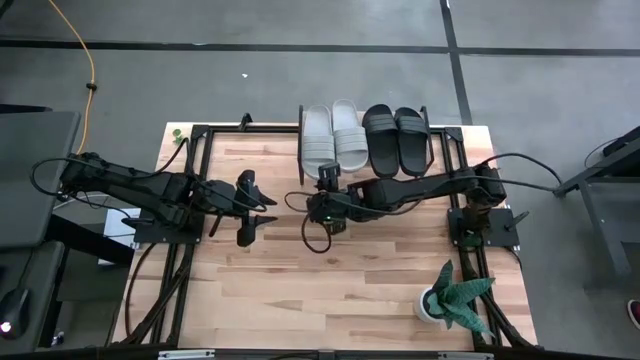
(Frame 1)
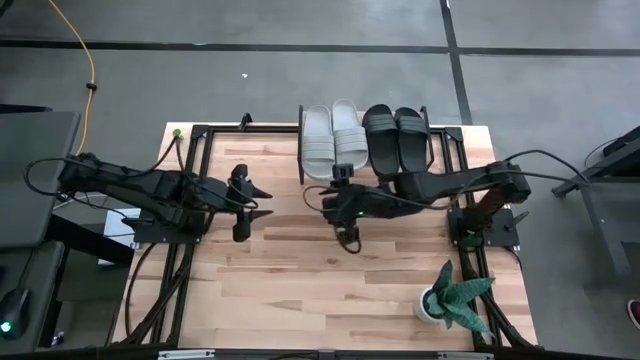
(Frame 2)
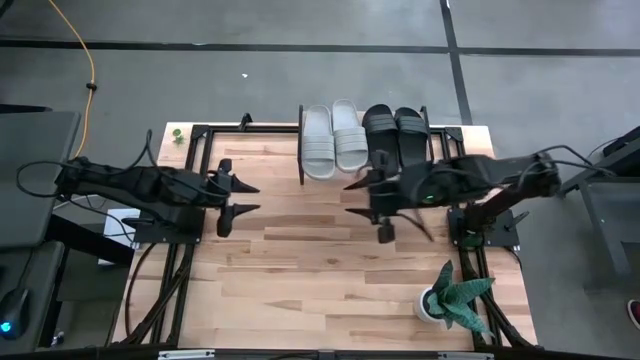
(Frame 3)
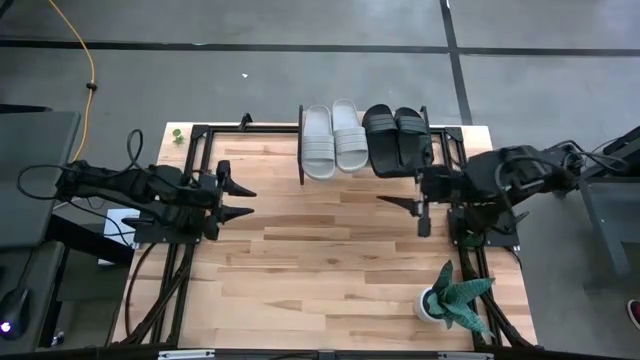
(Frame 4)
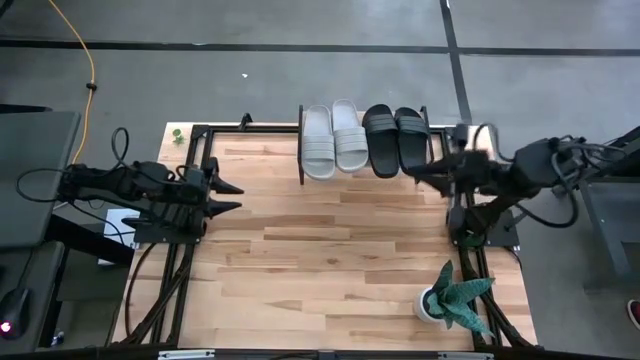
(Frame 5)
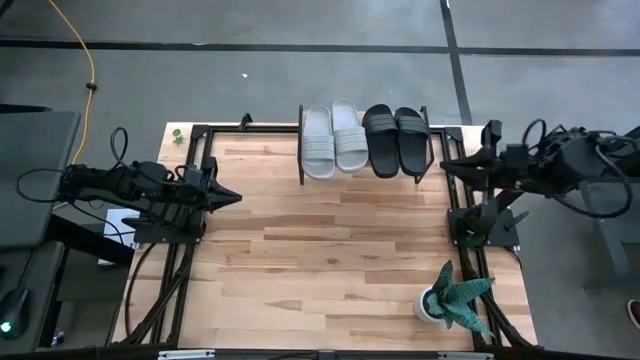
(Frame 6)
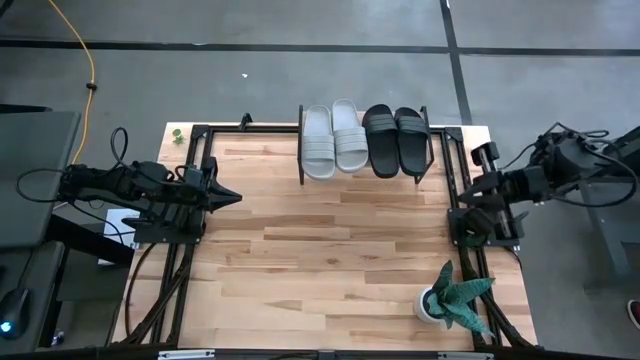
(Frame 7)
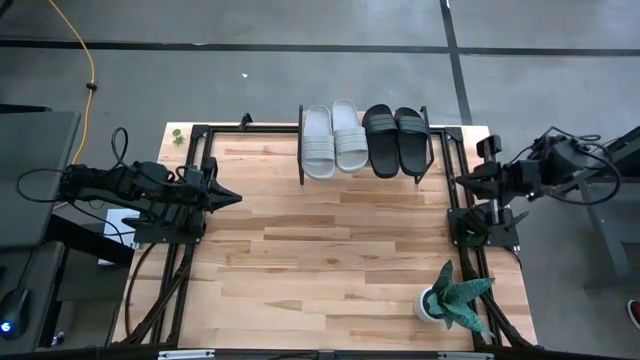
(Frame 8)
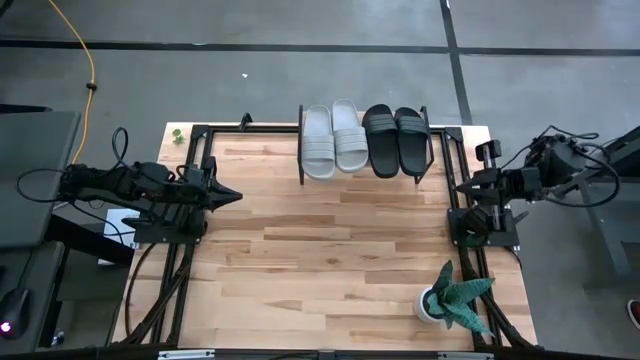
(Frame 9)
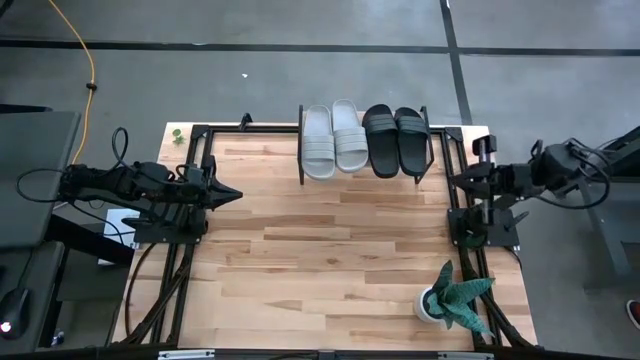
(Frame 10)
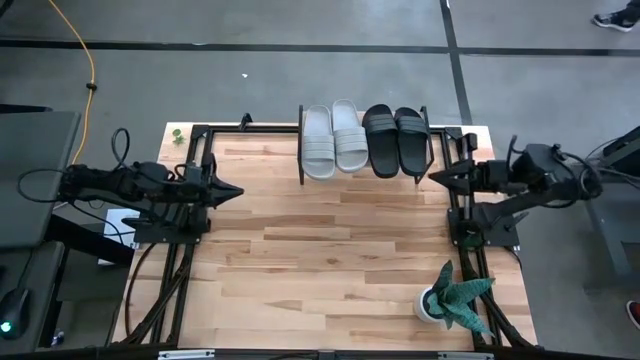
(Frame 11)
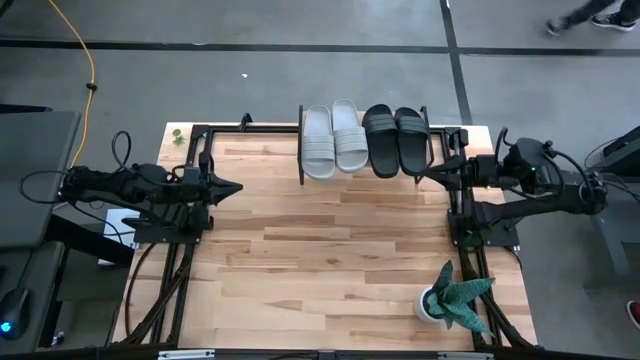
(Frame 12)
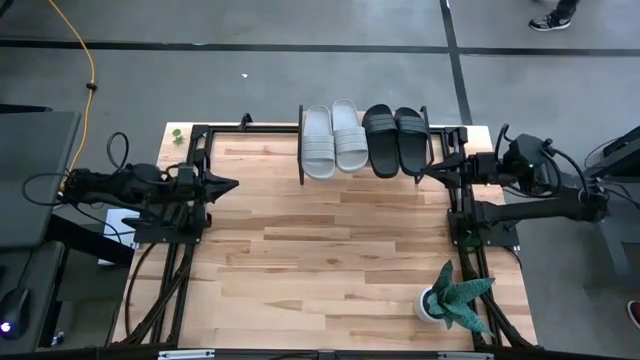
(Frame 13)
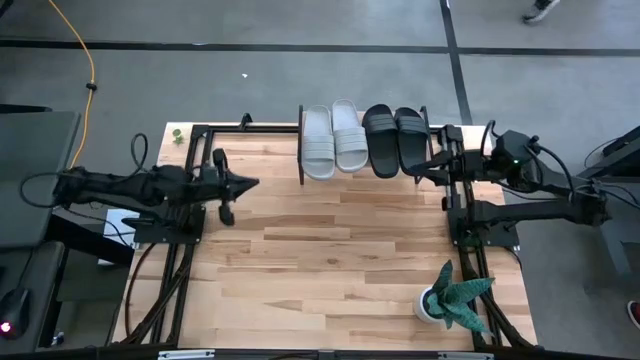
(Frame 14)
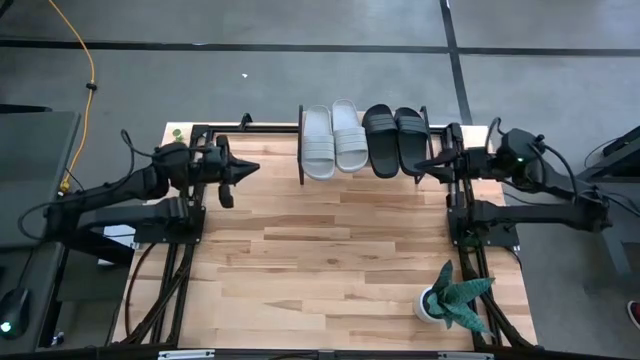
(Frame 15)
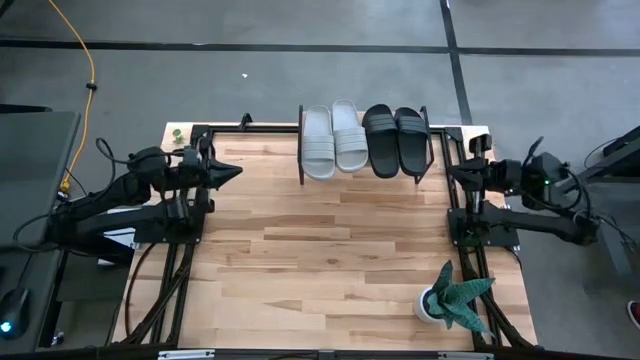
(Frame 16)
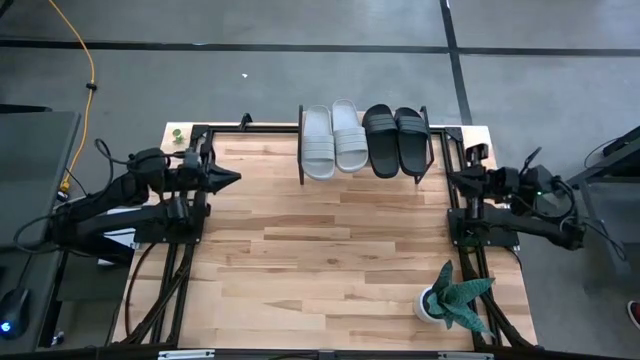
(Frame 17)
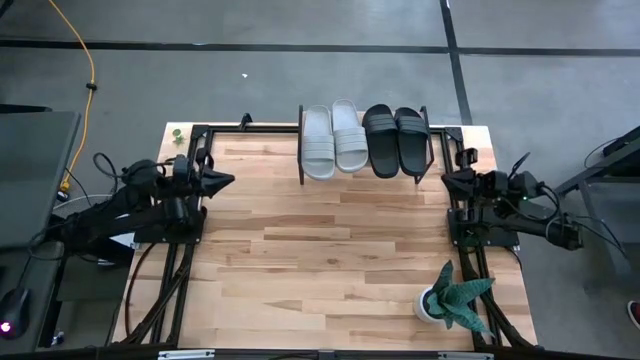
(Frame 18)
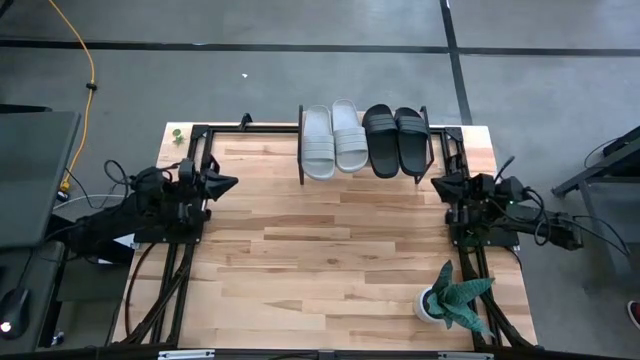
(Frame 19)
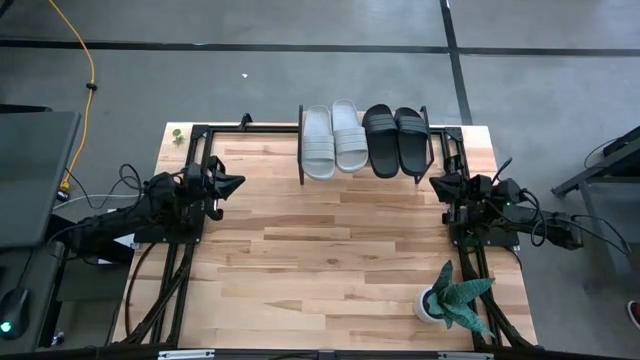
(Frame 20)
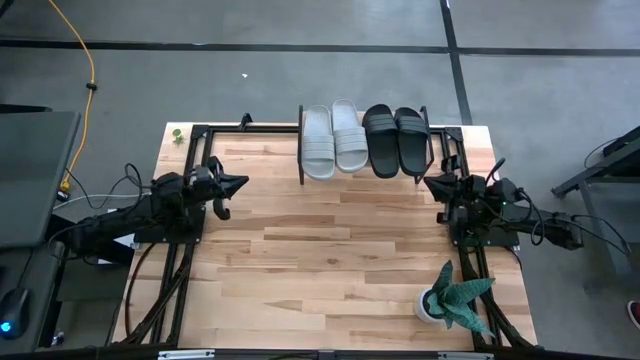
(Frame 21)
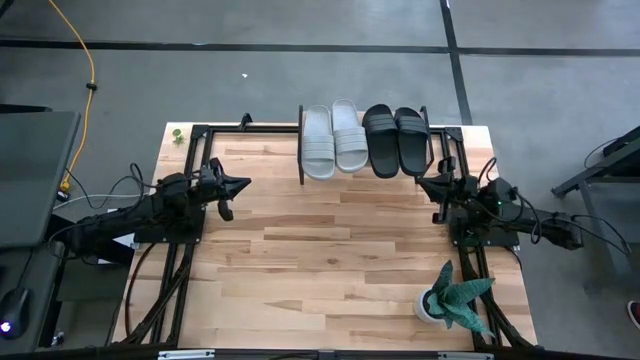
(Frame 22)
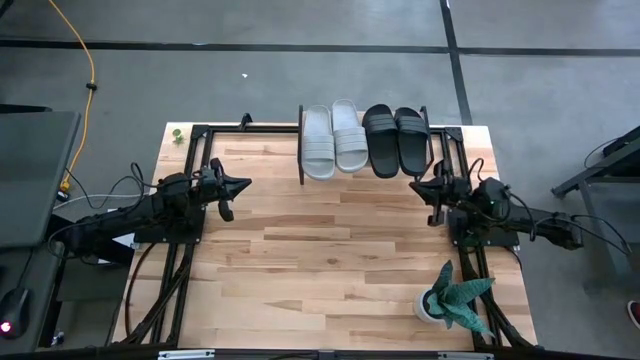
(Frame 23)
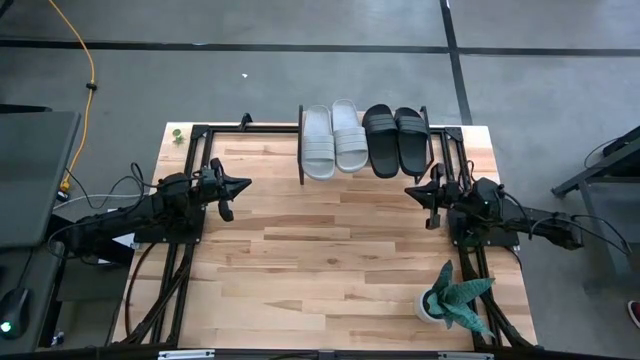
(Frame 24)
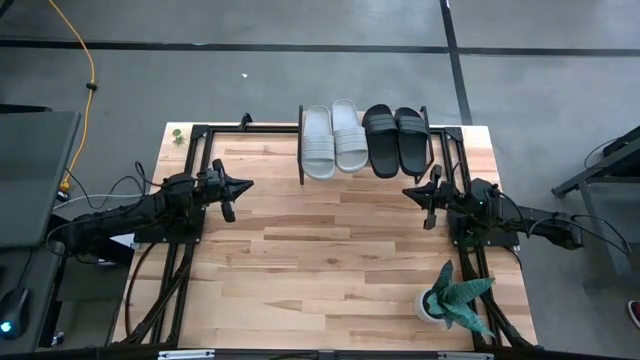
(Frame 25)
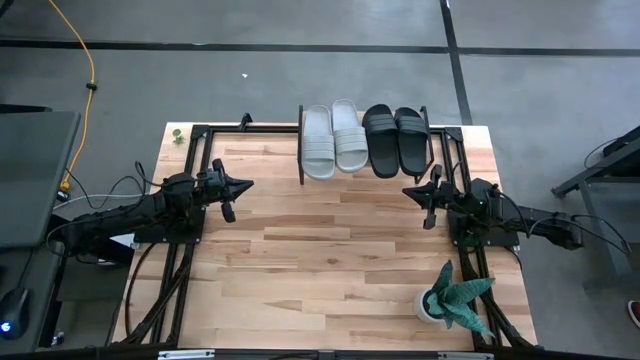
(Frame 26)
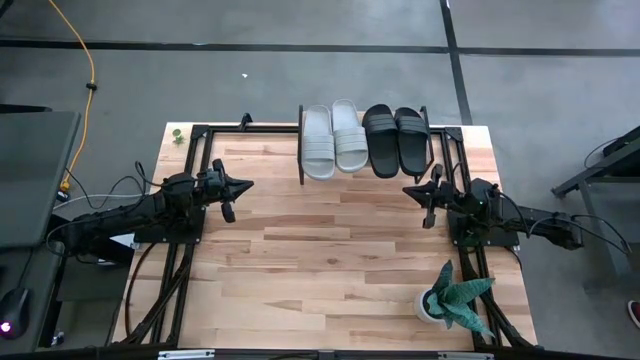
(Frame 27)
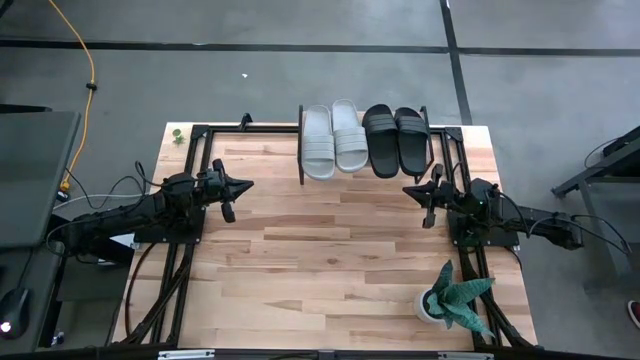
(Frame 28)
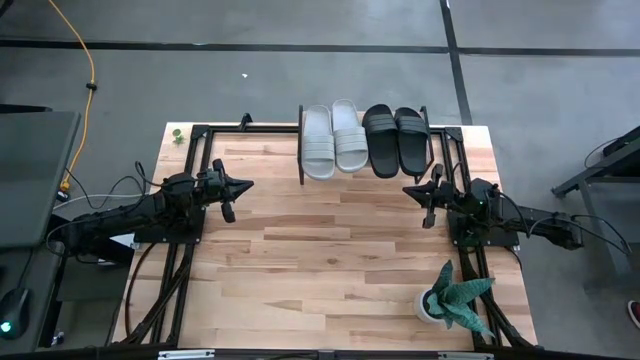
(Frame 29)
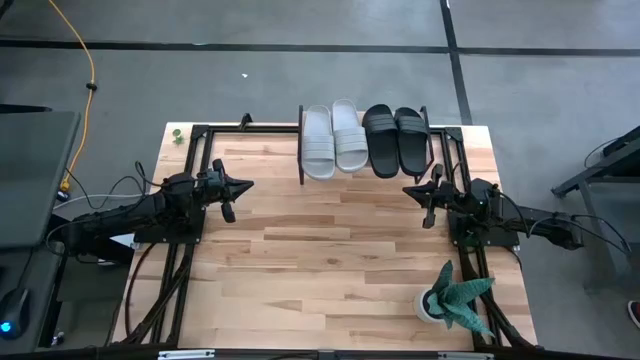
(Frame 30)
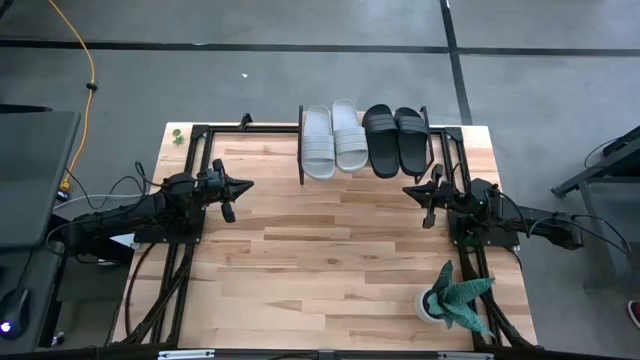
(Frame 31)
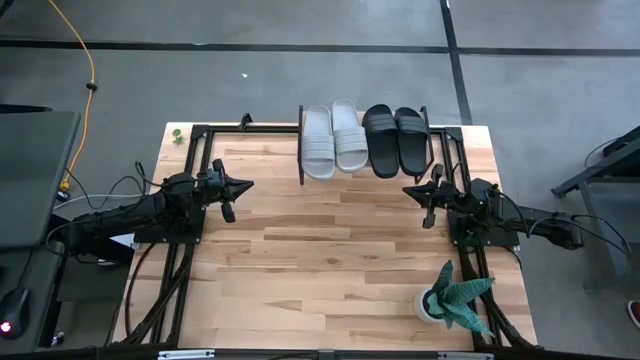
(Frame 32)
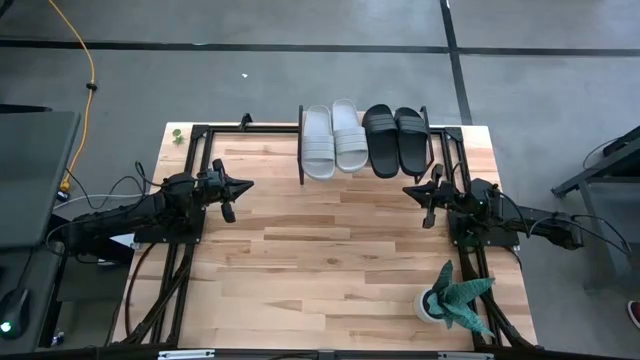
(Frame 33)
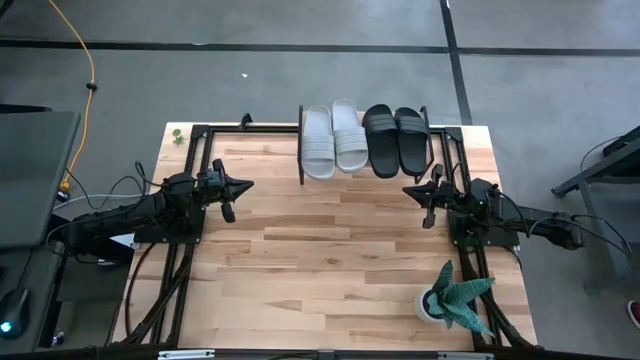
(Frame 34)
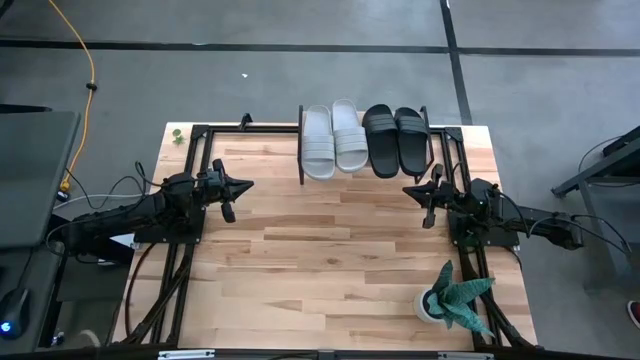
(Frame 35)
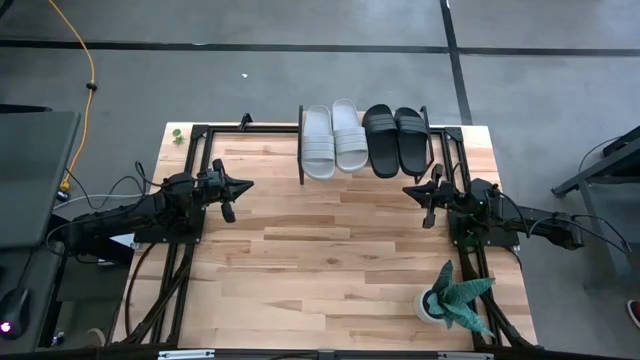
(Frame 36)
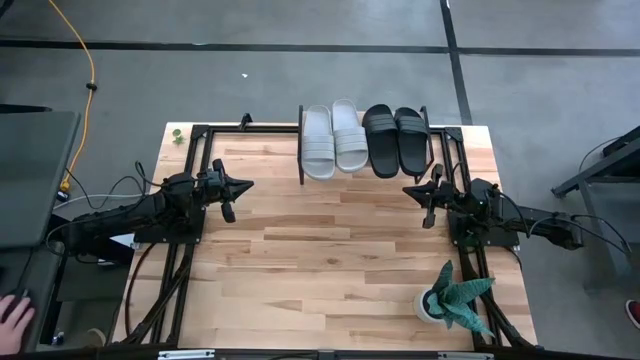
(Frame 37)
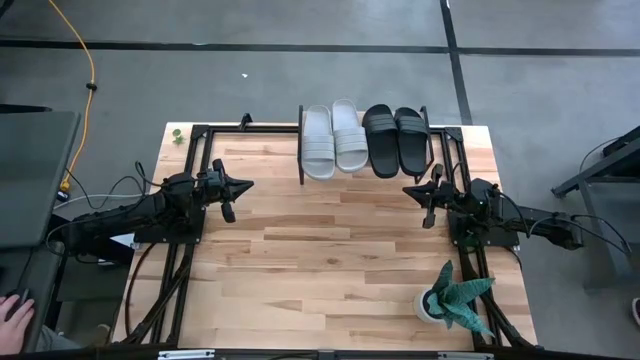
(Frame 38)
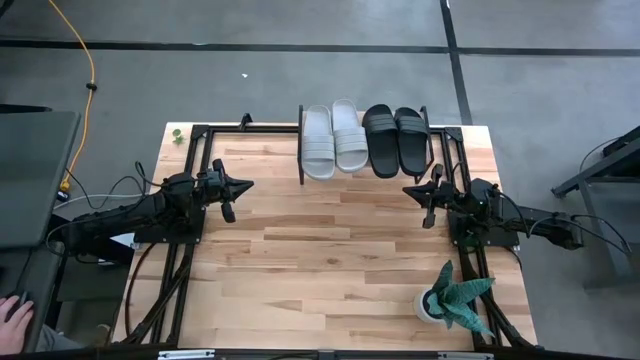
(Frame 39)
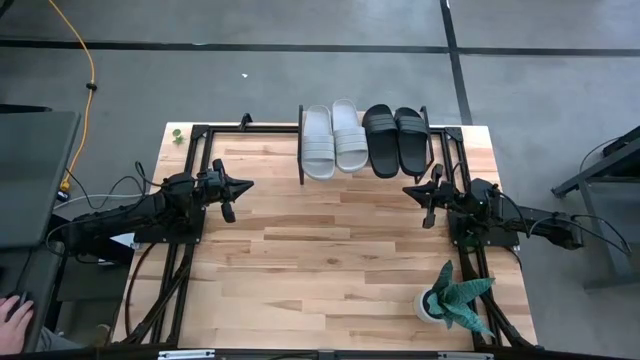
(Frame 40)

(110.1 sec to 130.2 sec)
Task: Pick and place slides into the shelf
Return to Home Position
